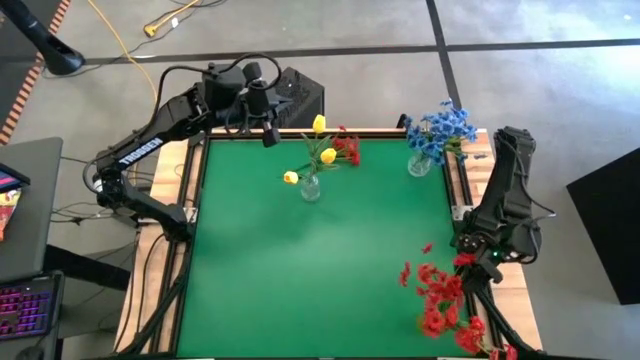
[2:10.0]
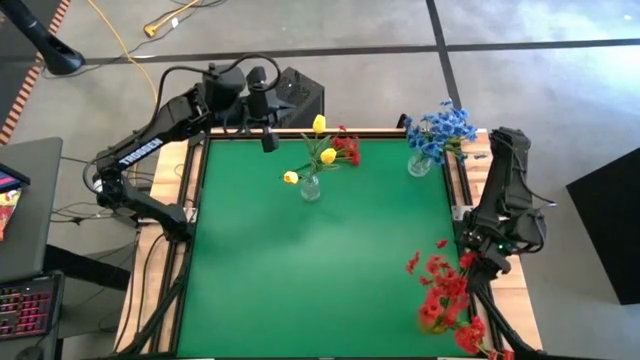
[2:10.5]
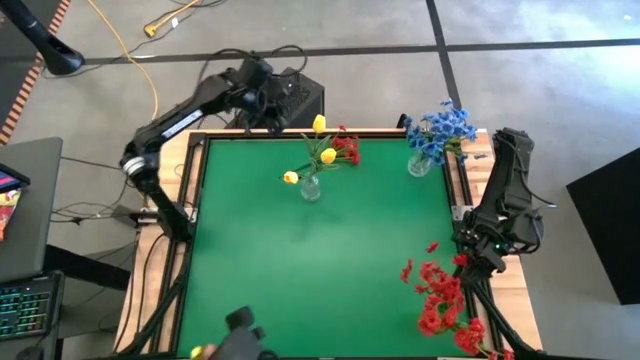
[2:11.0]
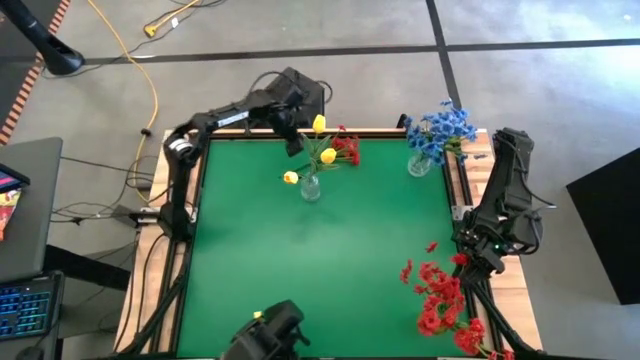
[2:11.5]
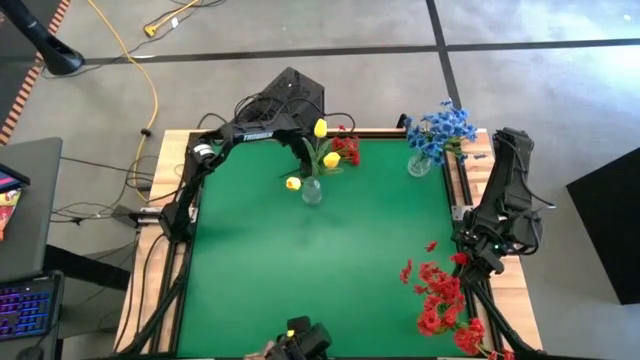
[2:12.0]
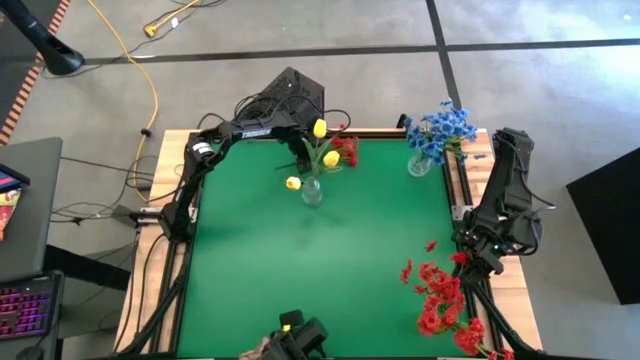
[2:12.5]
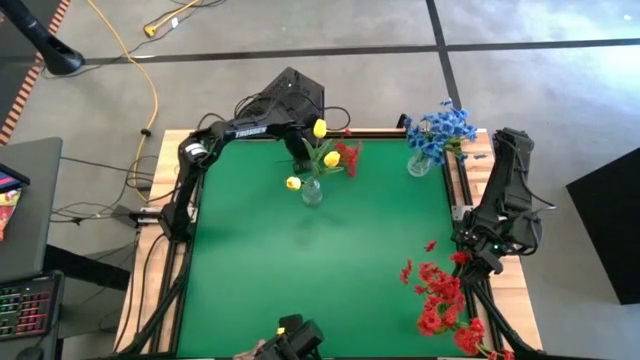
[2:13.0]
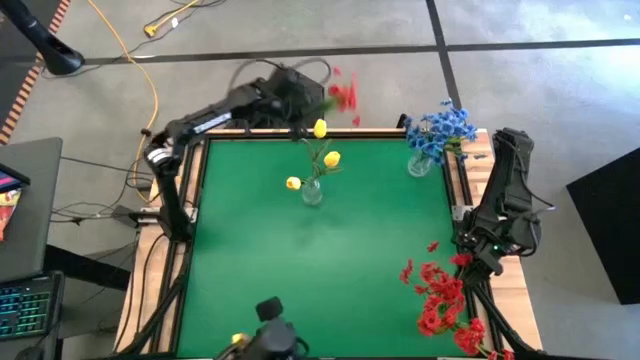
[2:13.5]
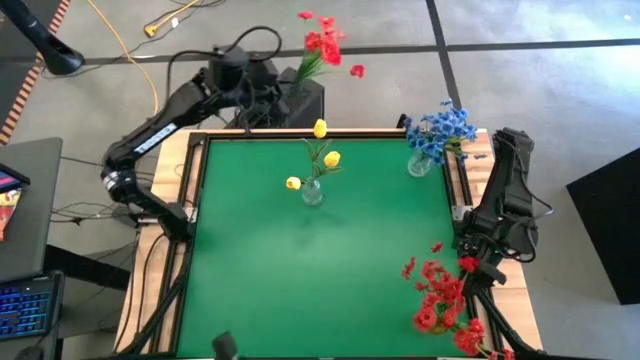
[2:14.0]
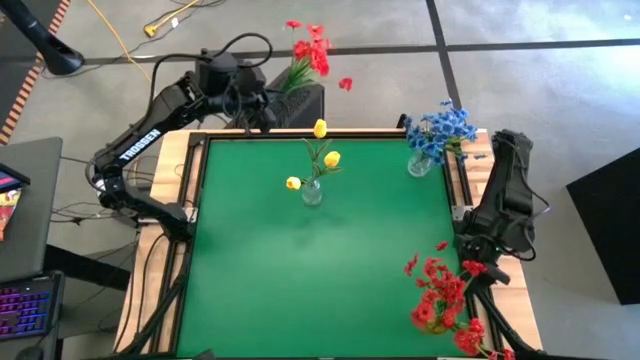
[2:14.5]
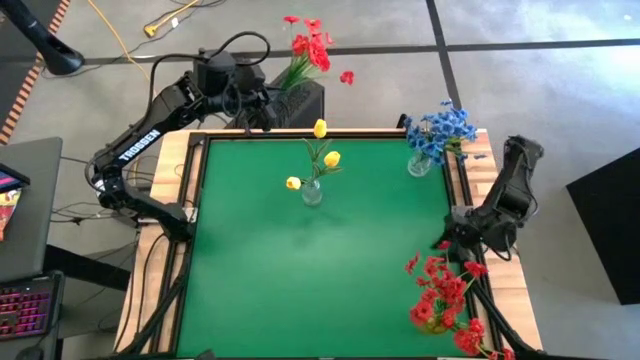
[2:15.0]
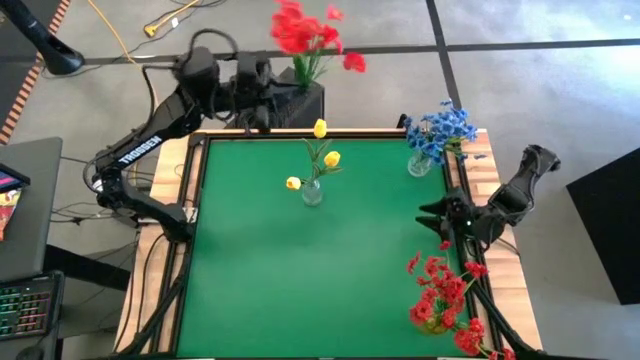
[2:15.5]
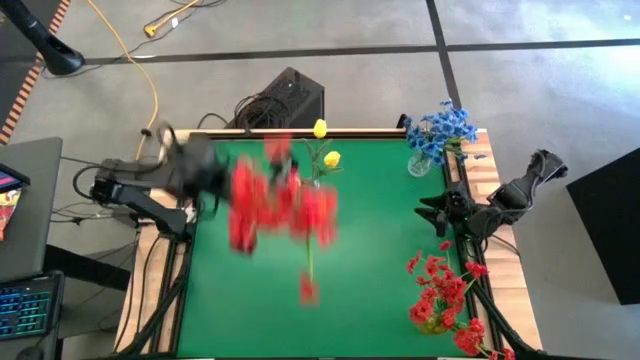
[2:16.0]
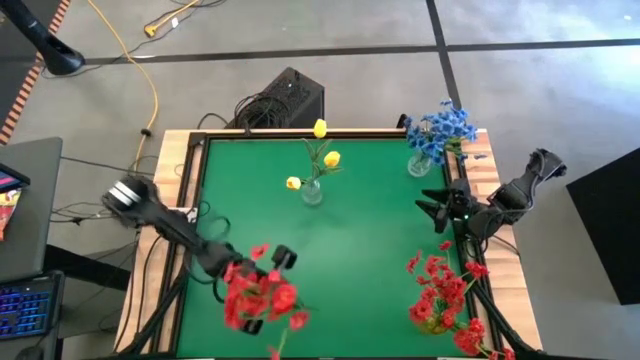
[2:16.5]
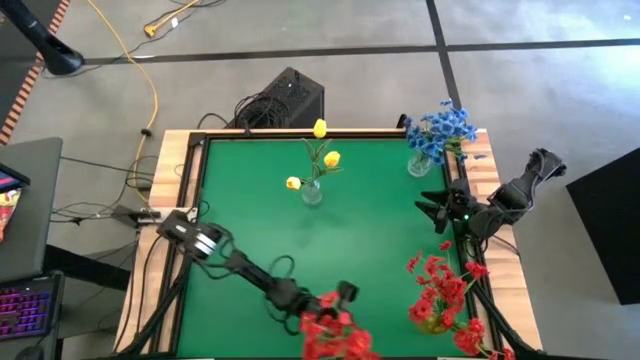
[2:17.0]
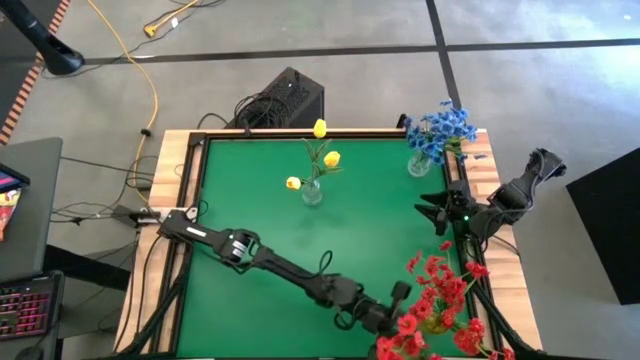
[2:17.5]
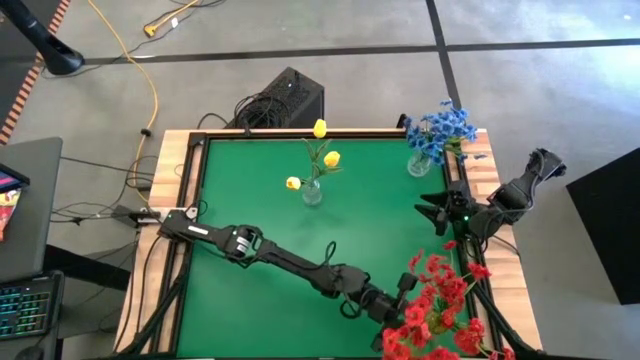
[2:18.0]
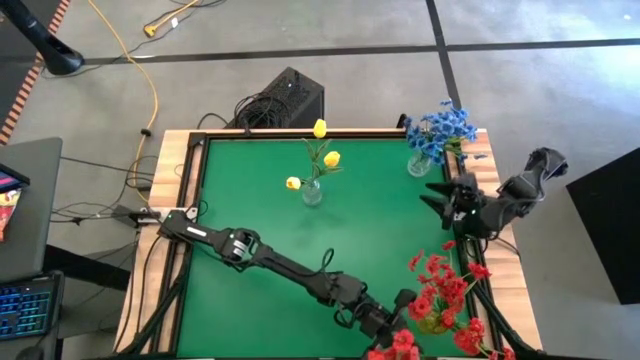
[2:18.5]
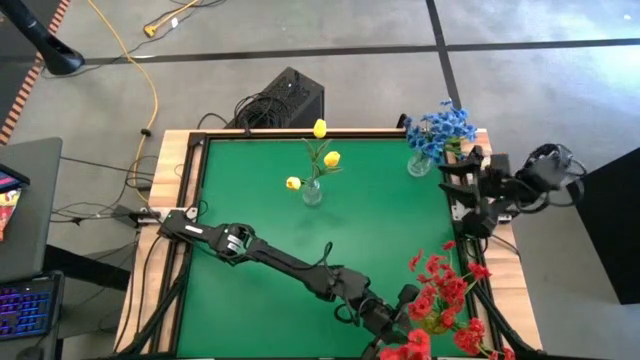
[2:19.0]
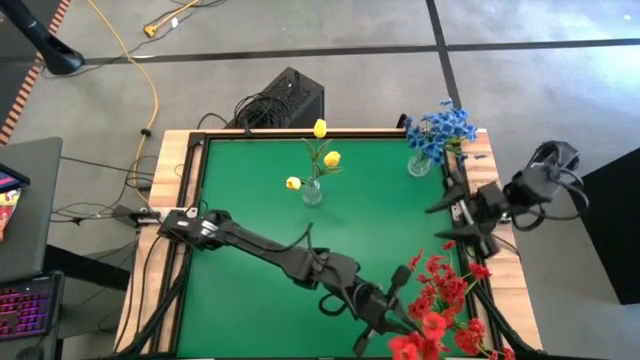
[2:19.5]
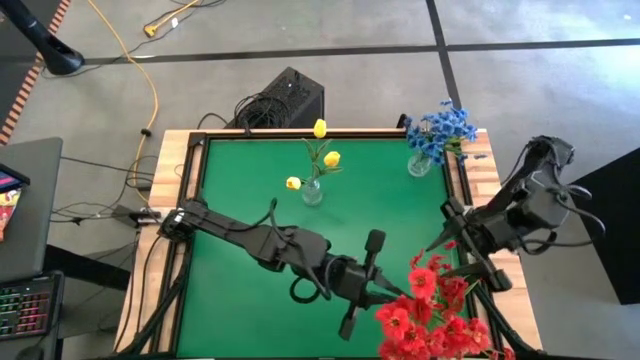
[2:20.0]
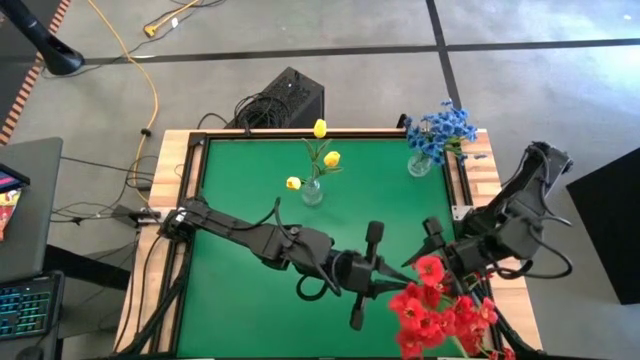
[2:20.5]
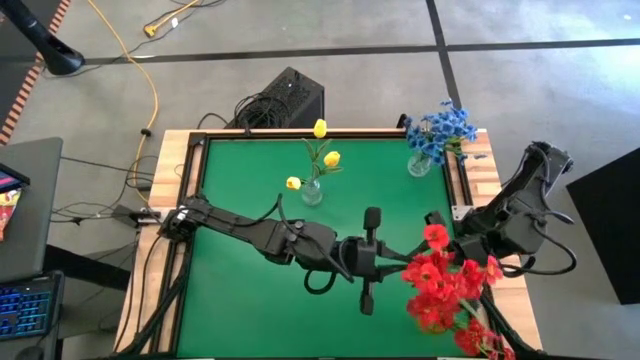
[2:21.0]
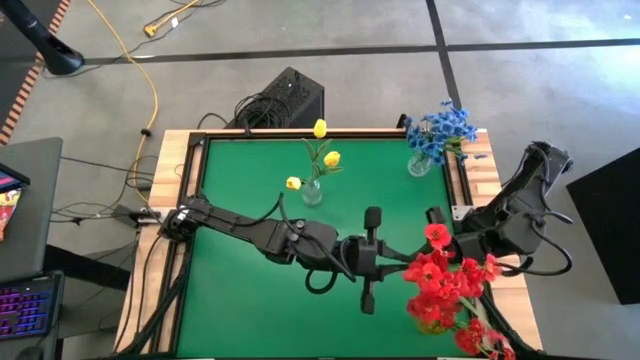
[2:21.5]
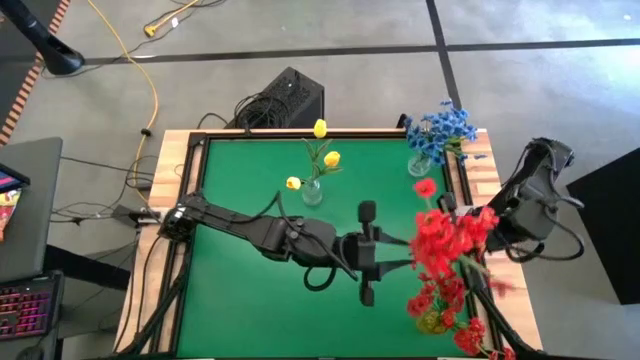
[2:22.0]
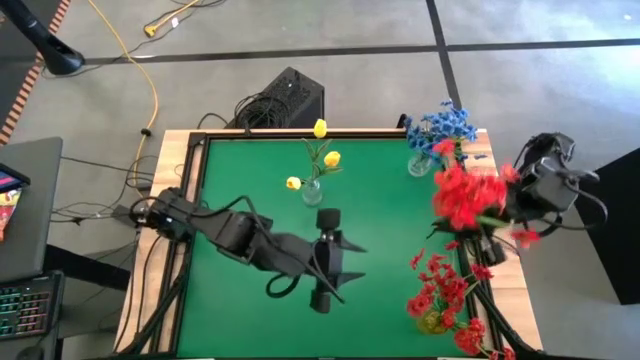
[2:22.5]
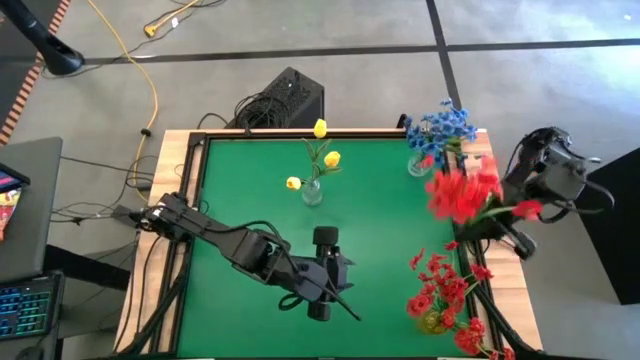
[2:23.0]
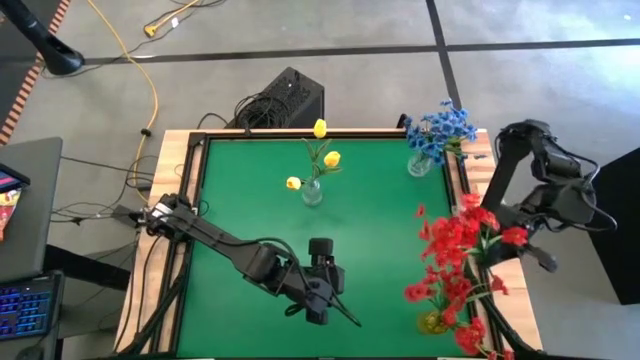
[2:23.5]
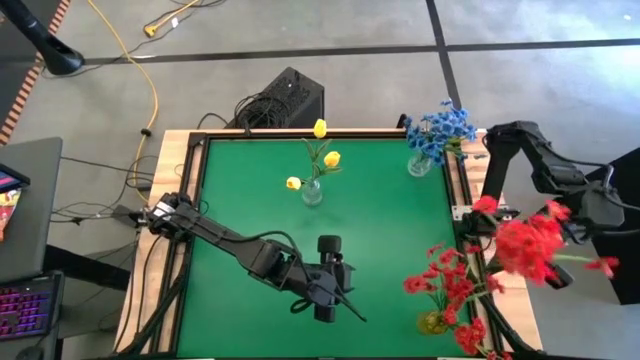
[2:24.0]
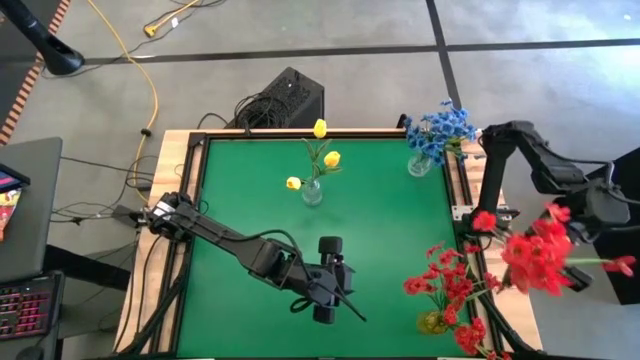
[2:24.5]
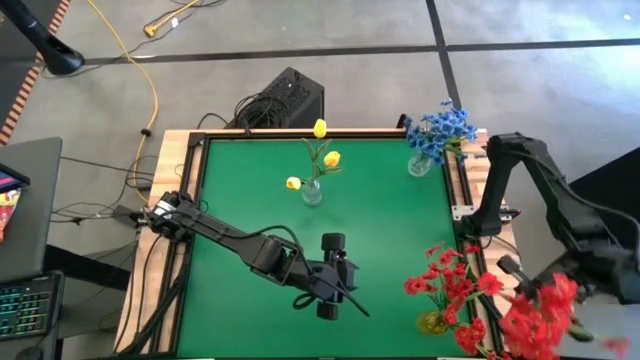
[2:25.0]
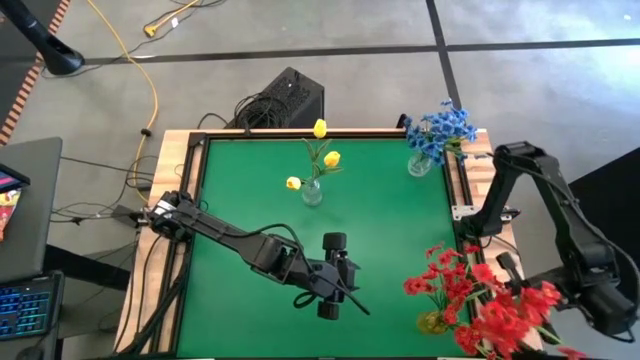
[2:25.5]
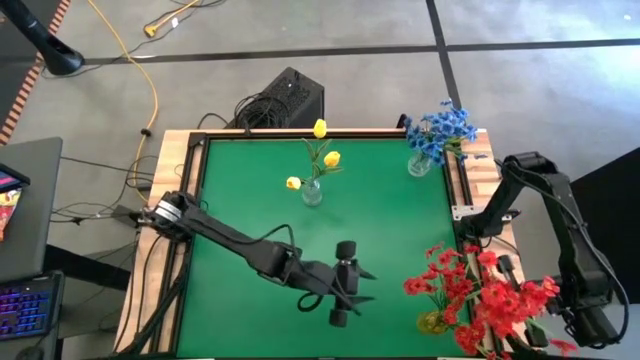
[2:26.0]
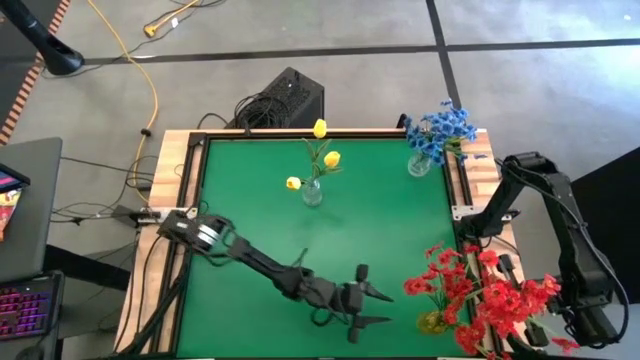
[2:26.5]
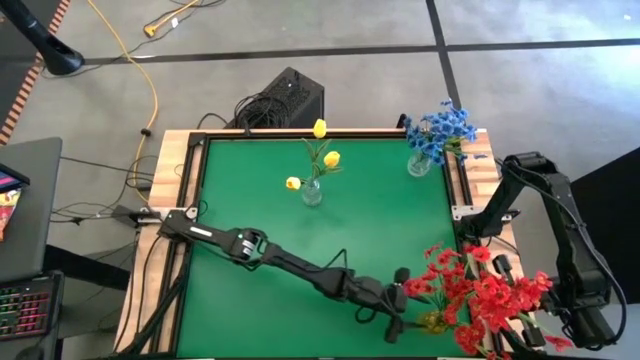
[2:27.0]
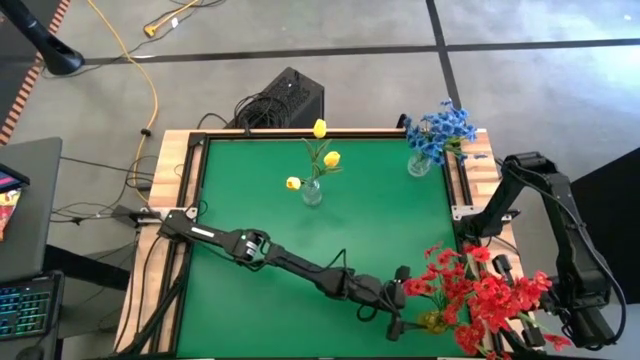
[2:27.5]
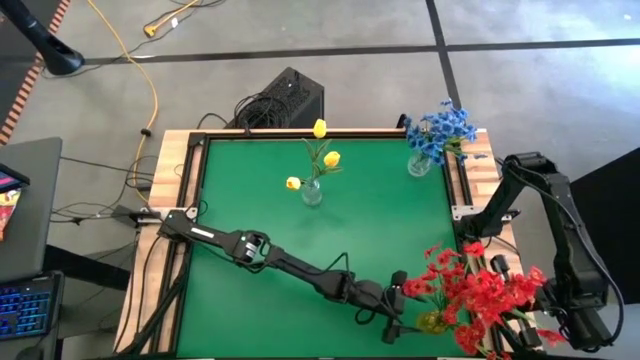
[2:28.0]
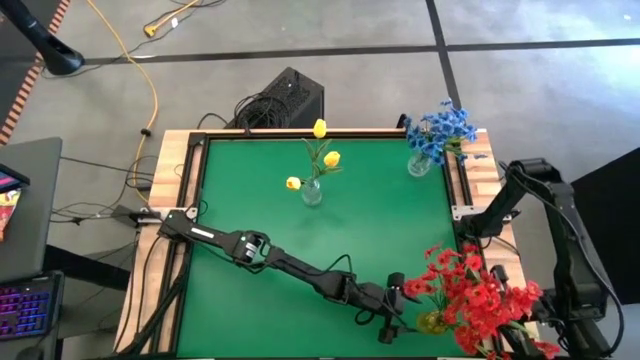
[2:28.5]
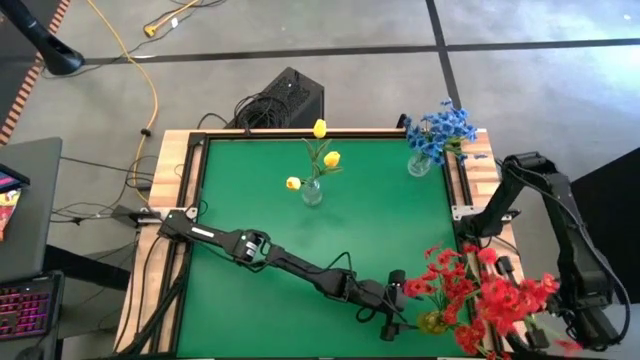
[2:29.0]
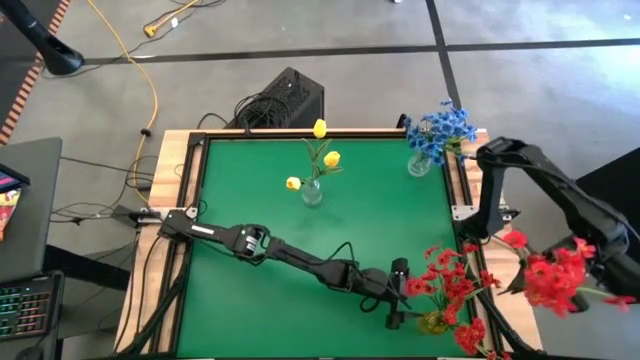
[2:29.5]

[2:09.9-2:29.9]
Task: Sort flowers into vase by color
Put the red flowers into the yellow vase

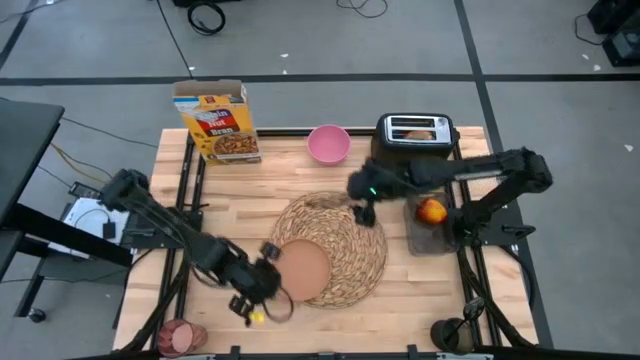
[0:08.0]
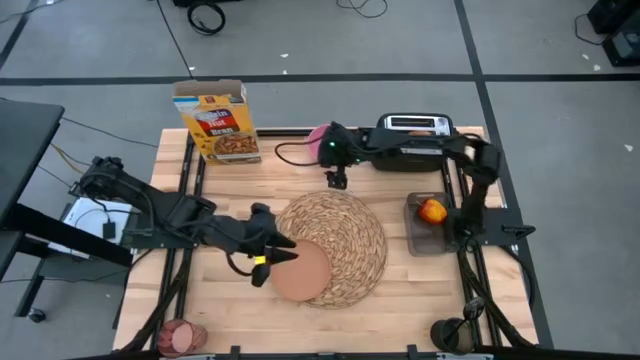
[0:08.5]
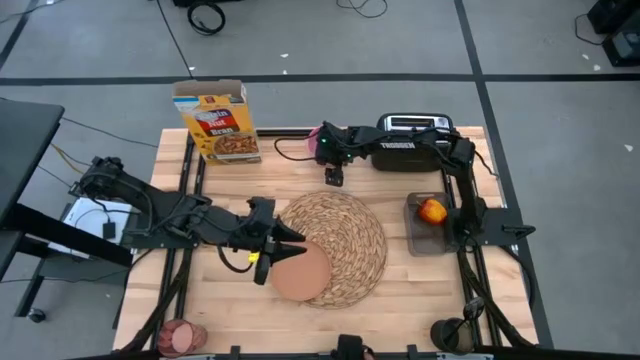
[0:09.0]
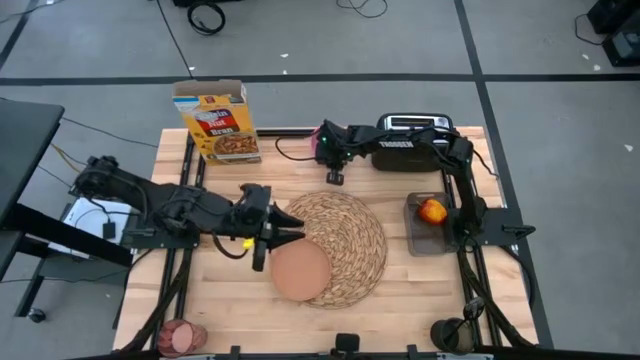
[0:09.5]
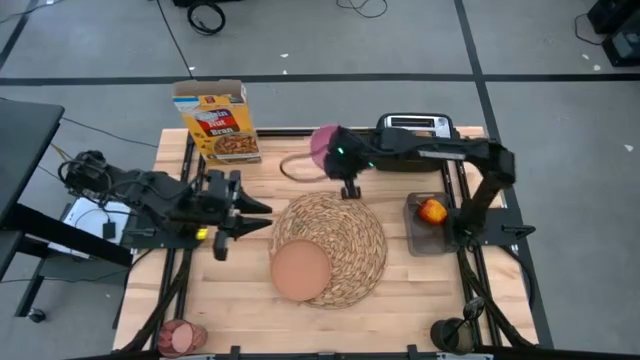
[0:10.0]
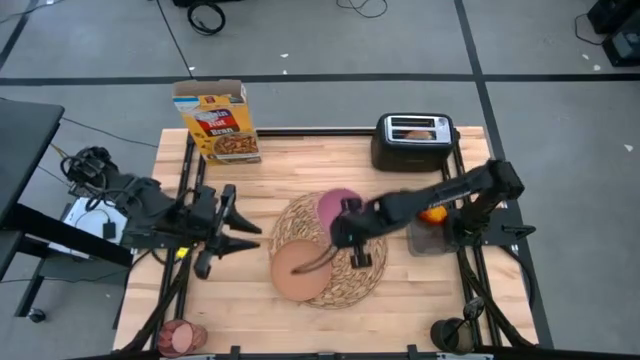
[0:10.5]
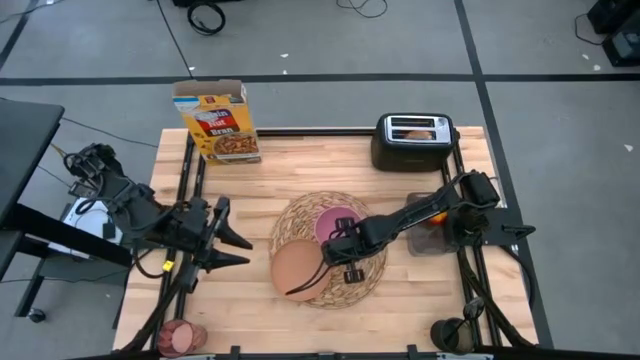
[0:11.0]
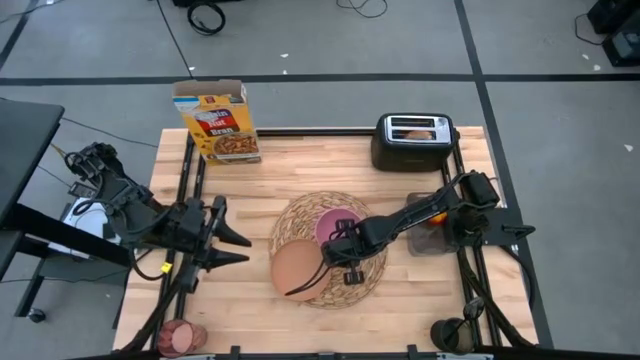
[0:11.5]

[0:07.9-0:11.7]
Task: Arrange a breakfast setting
Put the pink bowl on the brown placemat
